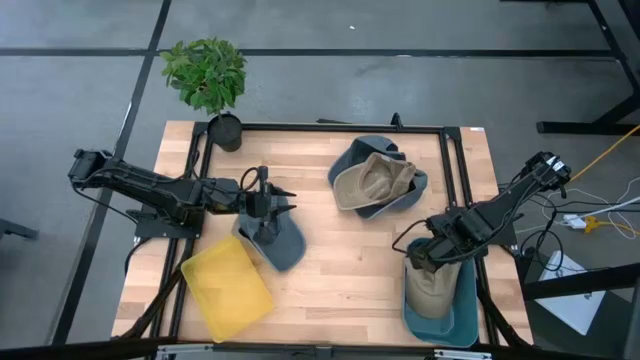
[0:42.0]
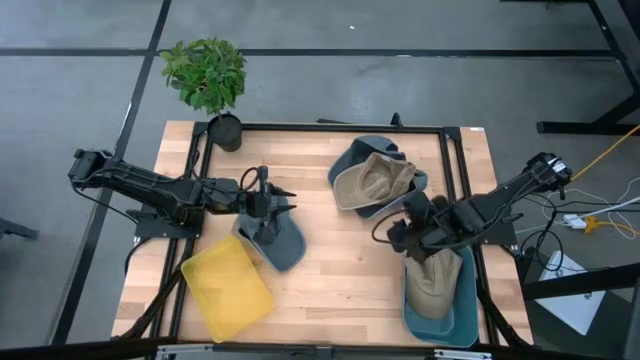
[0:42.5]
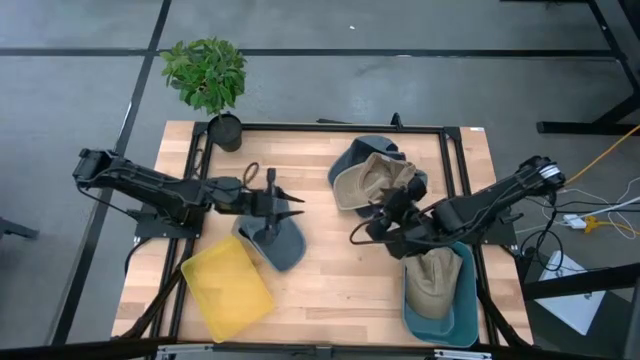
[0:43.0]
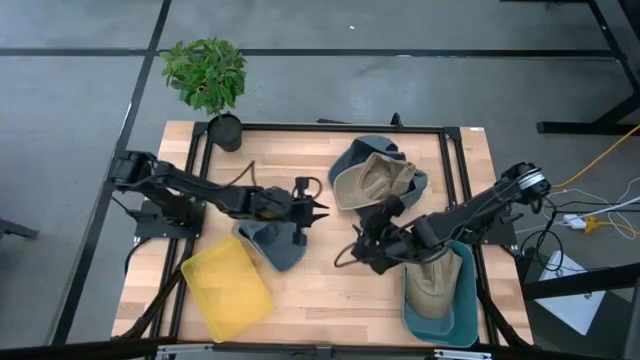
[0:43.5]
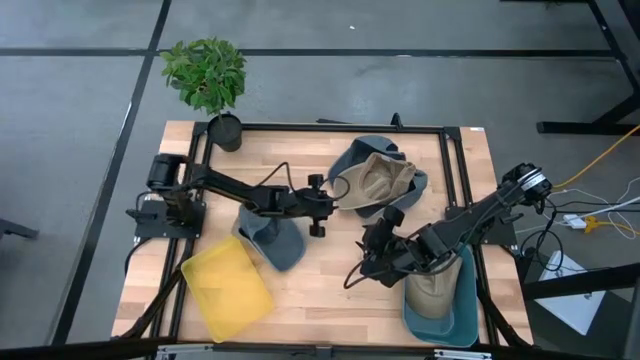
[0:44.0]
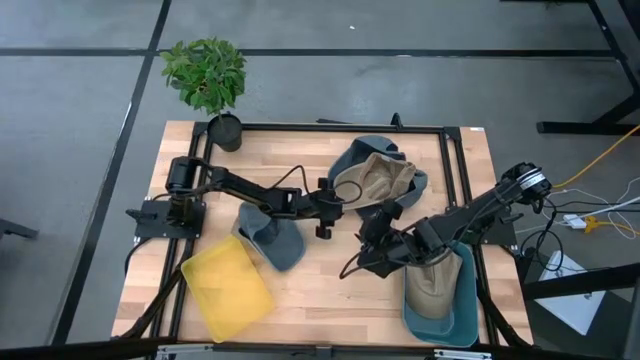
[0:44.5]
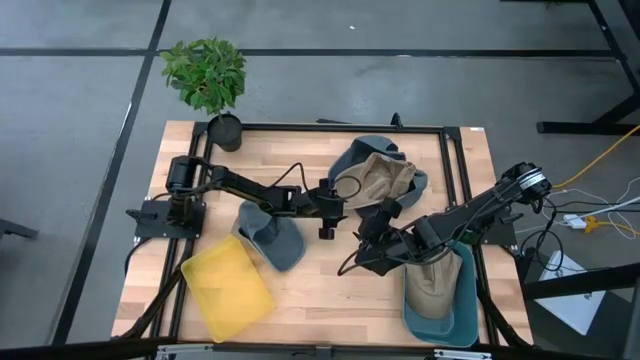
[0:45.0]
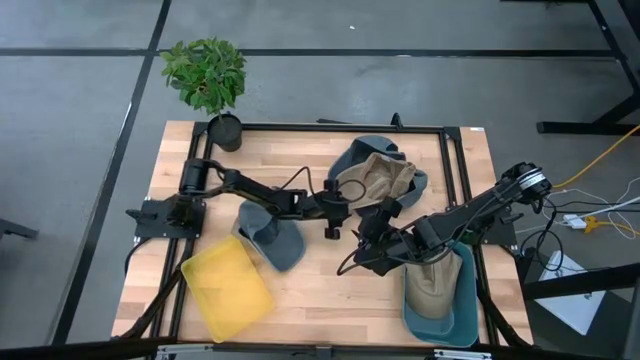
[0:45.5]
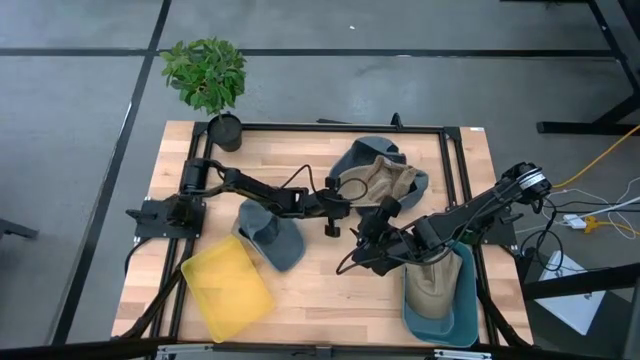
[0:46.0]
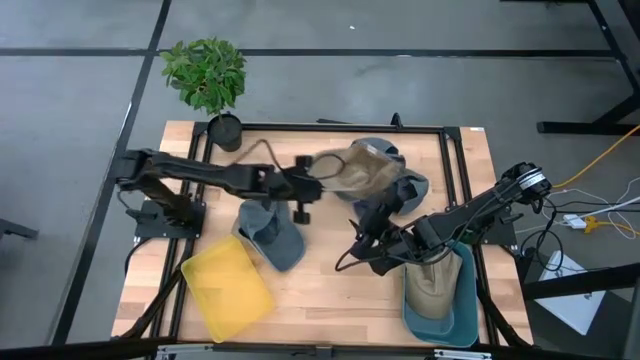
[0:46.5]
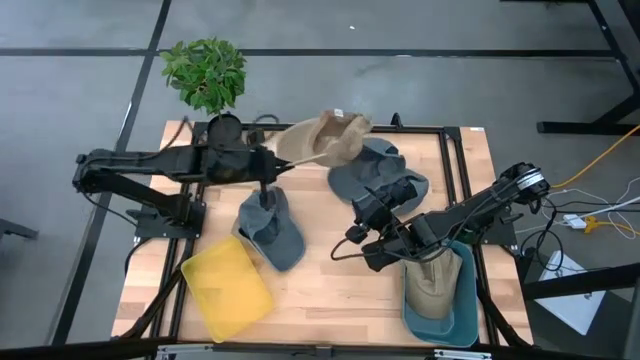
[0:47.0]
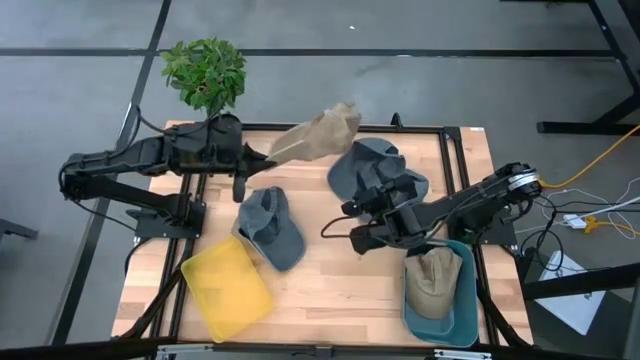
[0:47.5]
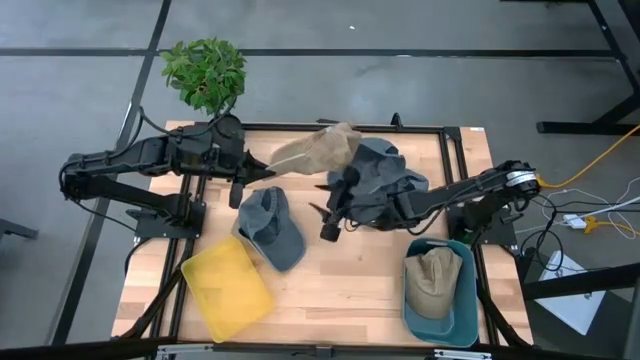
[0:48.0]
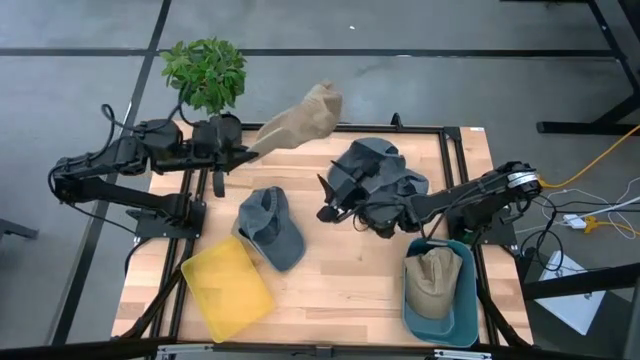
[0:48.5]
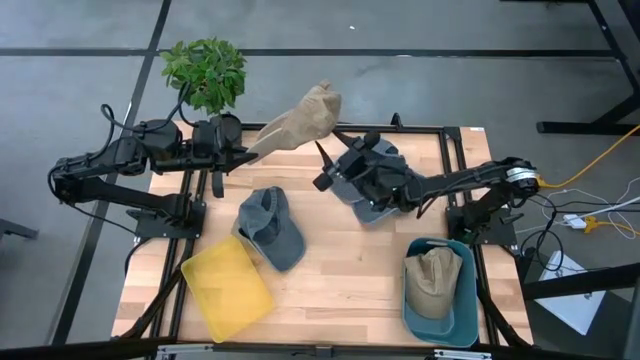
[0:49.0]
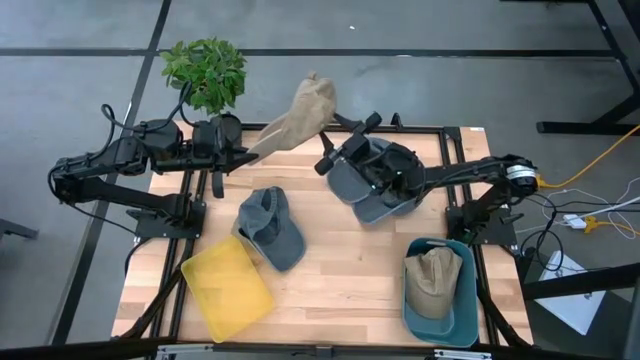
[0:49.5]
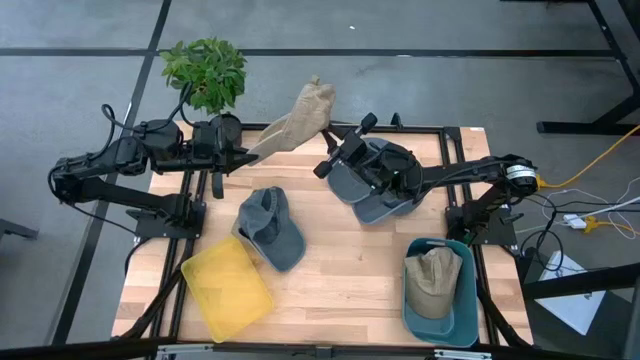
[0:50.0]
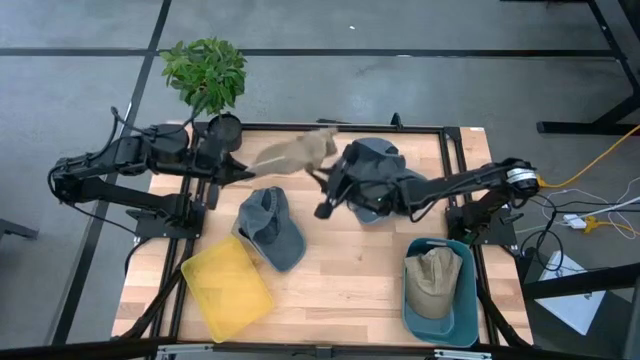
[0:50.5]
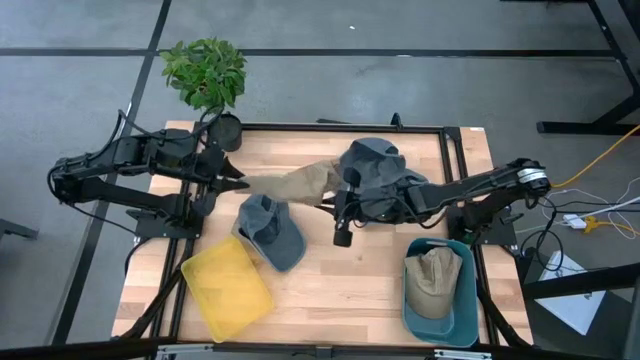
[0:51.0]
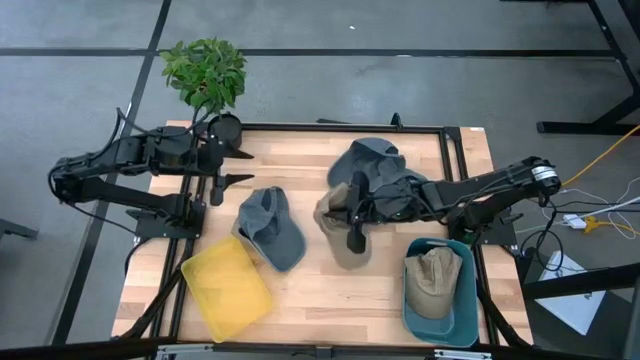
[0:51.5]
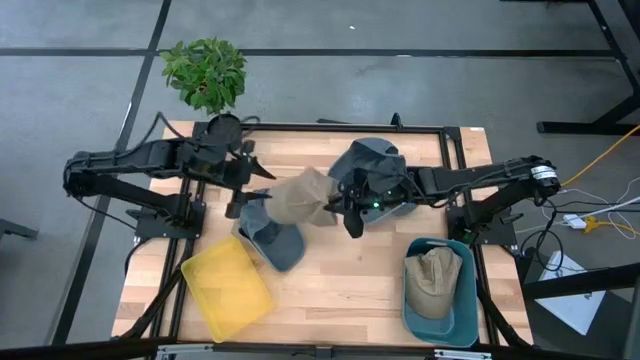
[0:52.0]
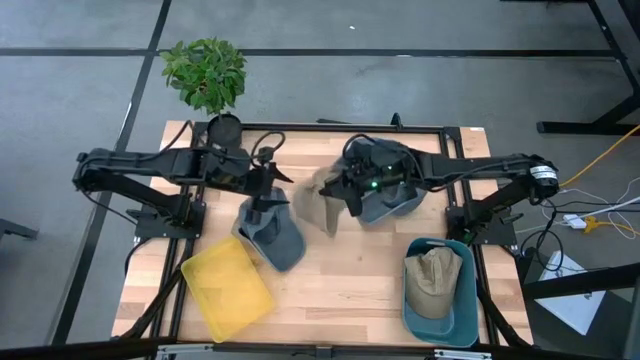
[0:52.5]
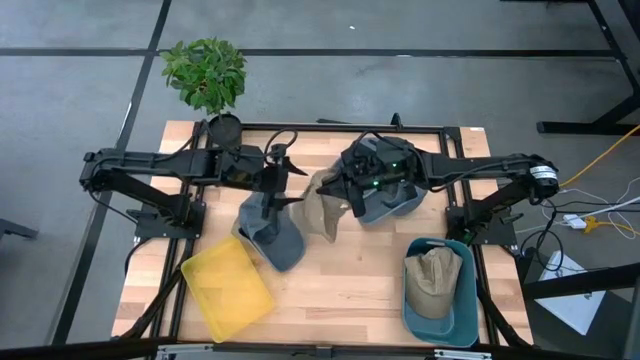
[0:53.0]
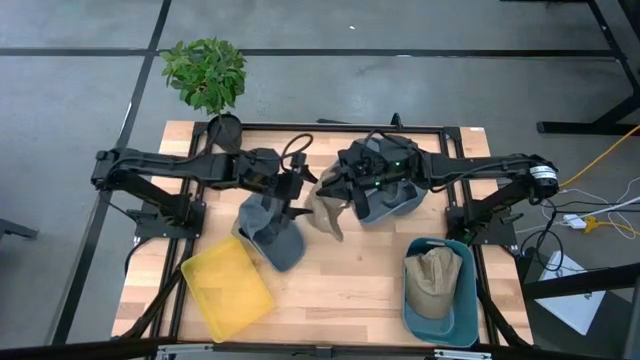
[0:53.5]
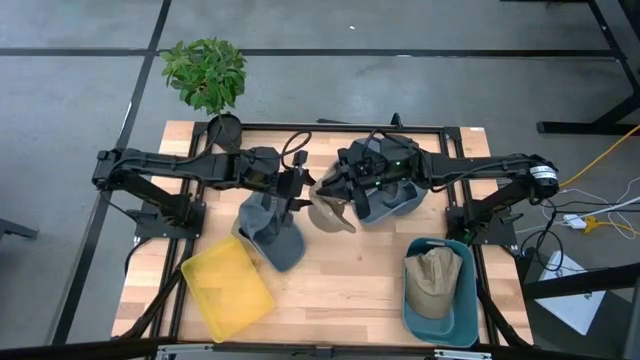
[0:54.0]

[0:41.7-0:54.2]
Task: Pick & Place hat
Put the right brown cap into the blue bin

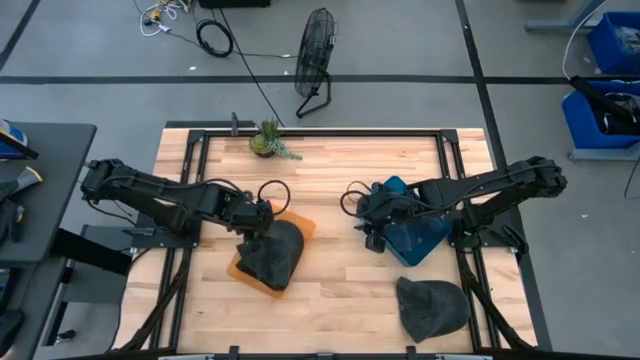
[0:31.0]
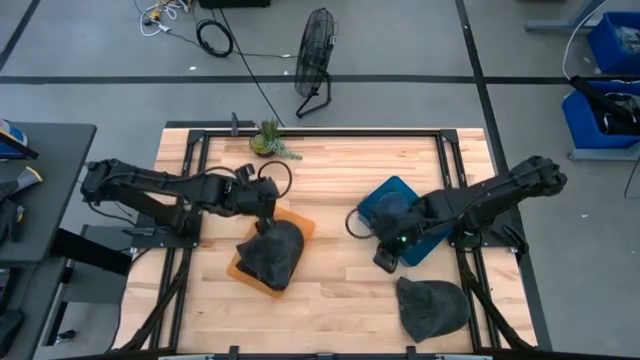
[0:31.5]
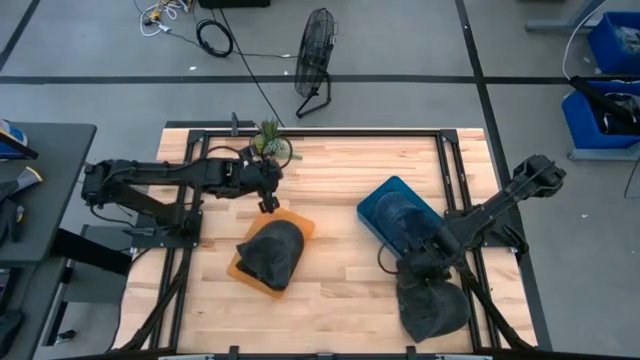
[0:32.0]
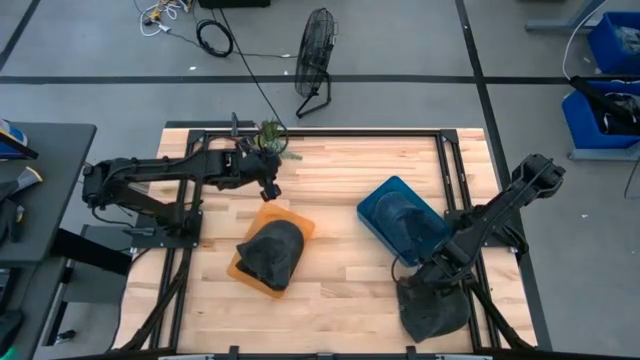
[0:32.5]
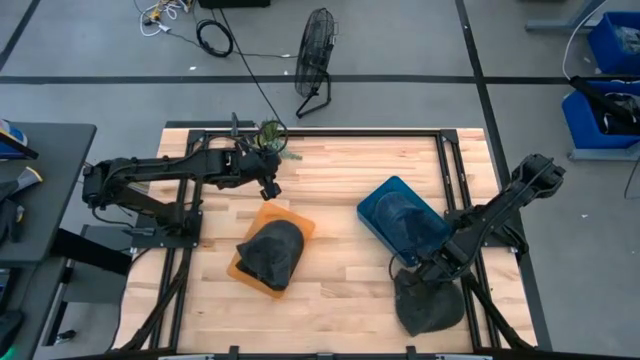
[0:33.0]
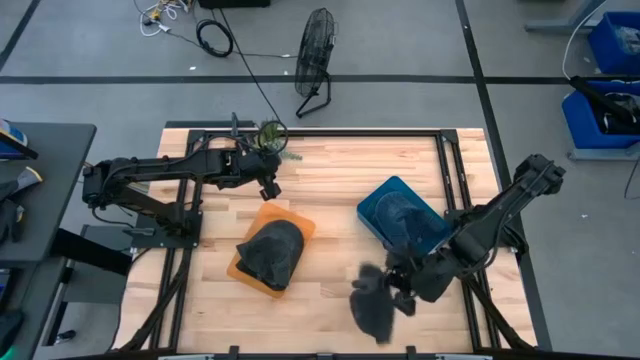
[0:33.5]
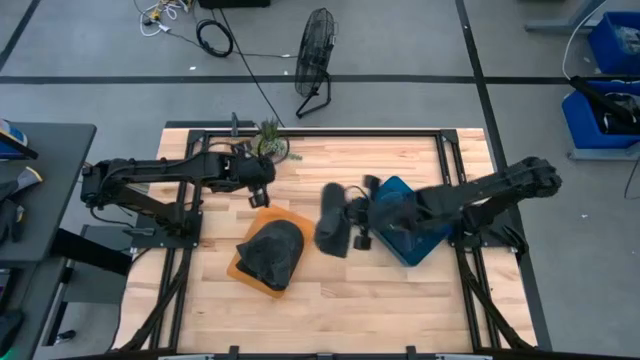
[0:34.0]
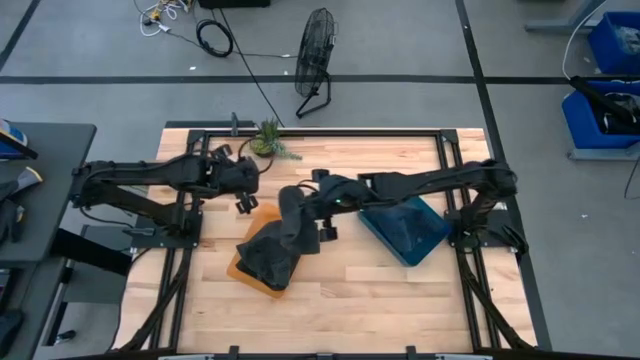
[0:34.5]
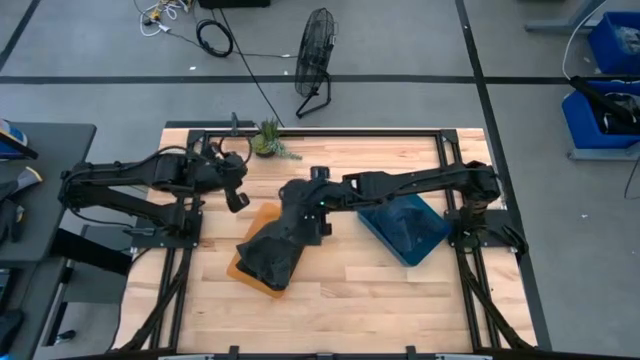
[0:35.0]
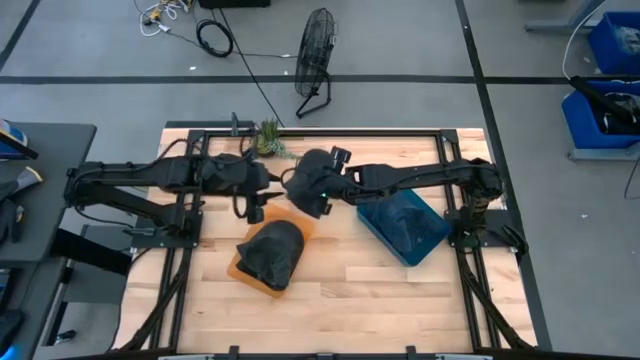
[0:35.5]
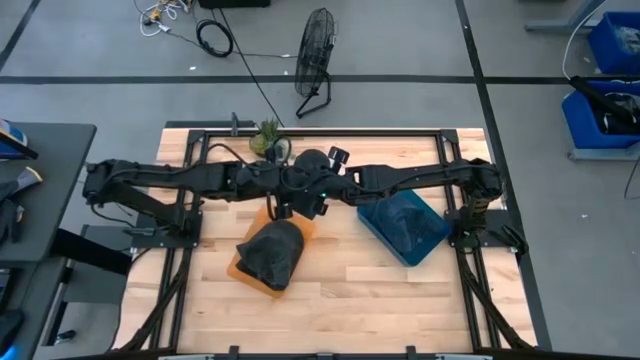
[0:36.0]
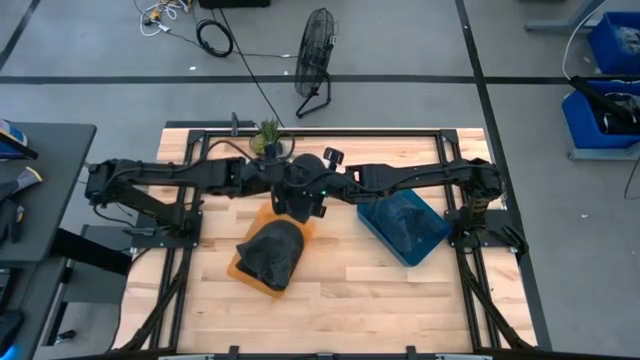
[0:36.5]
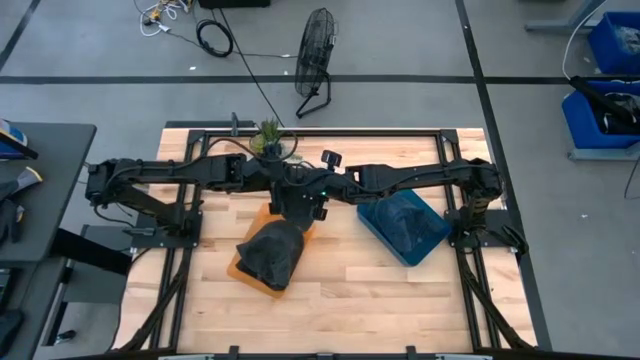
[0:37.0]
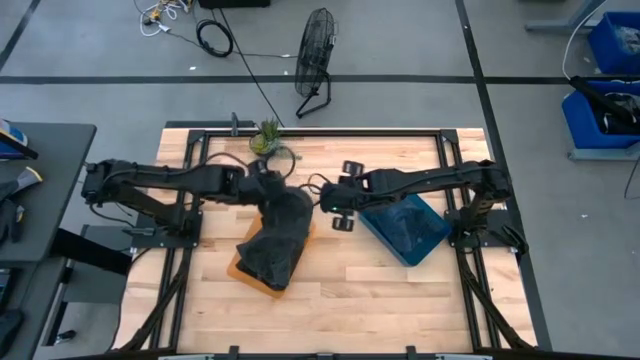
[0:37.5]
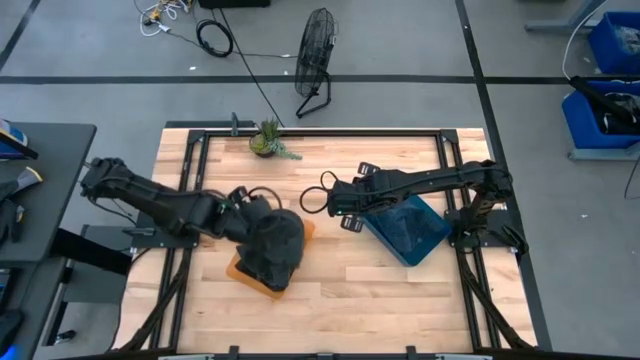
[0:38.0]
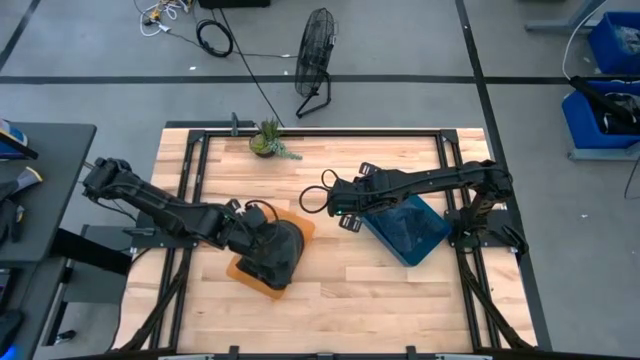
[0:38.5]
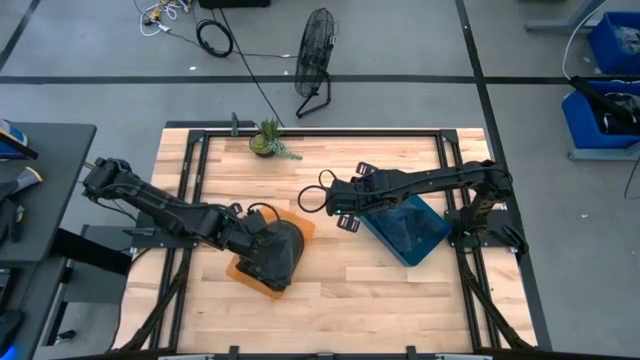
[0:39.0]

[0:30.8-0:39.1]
Task: Pick & Place hat
Put the black cap into the orange bin
